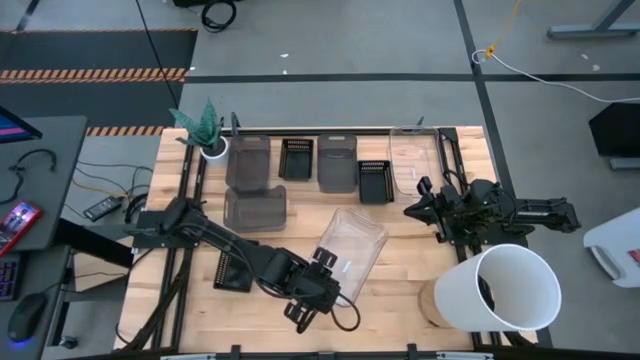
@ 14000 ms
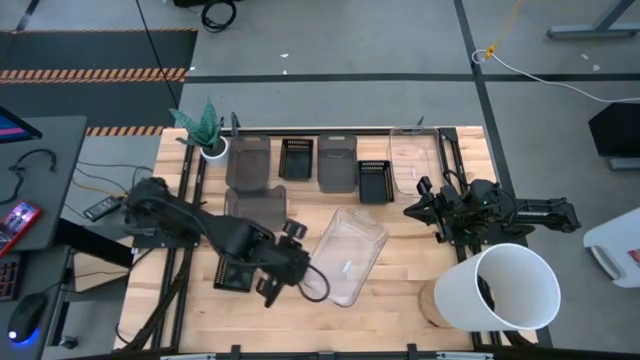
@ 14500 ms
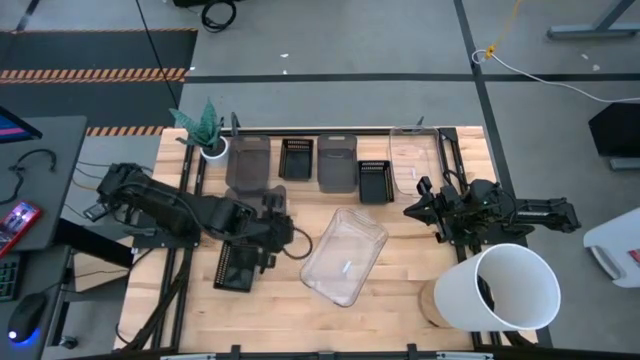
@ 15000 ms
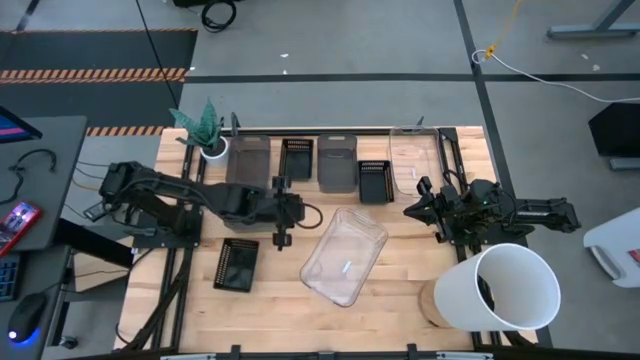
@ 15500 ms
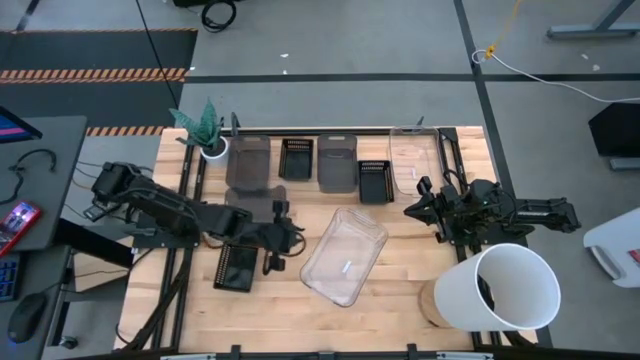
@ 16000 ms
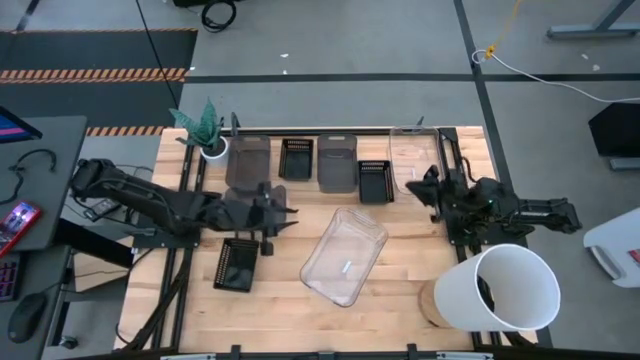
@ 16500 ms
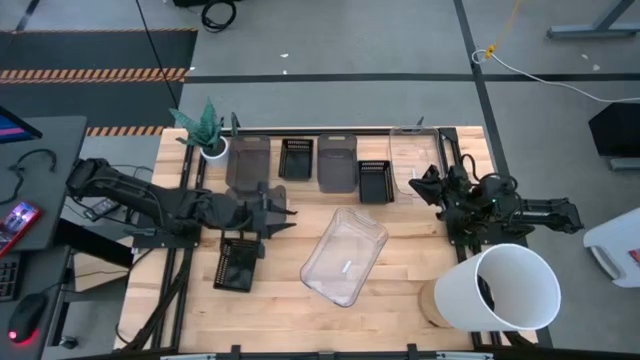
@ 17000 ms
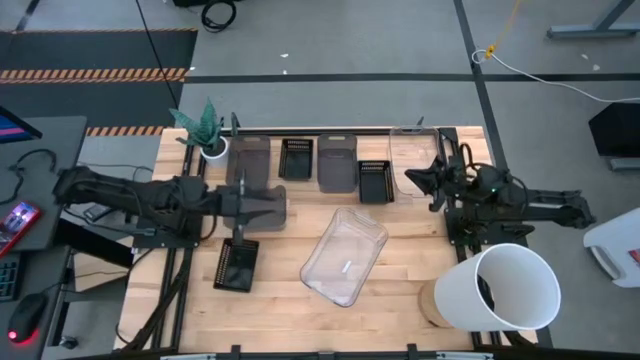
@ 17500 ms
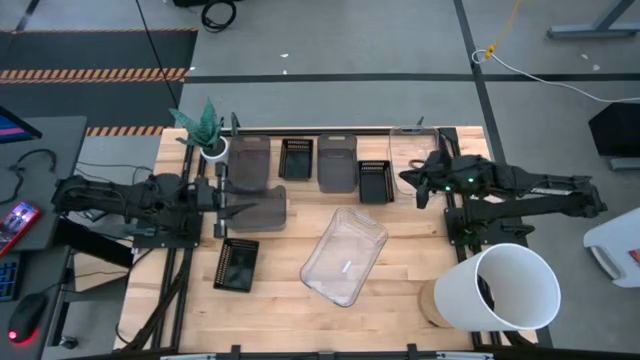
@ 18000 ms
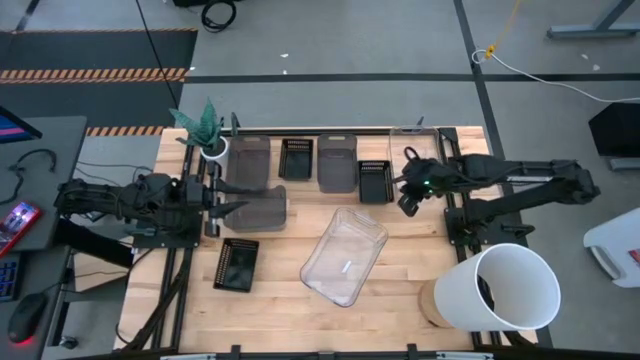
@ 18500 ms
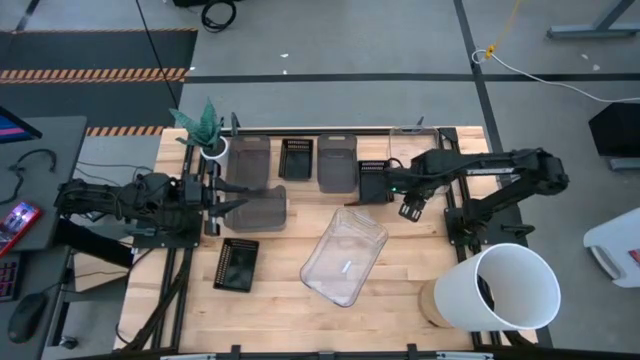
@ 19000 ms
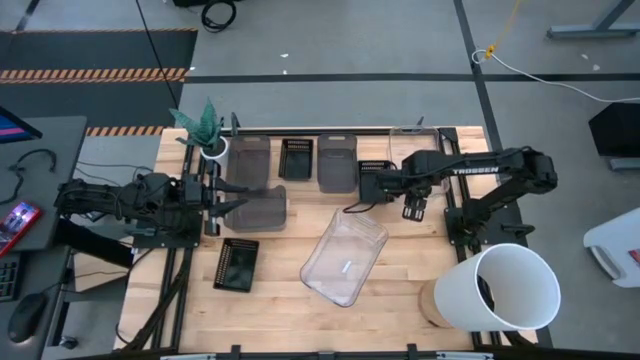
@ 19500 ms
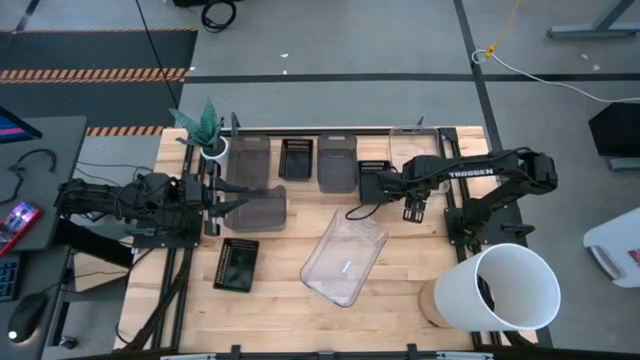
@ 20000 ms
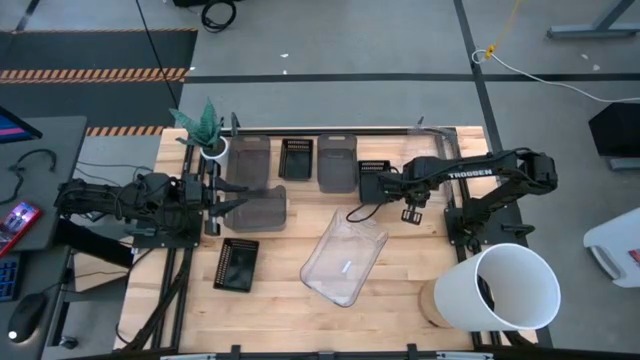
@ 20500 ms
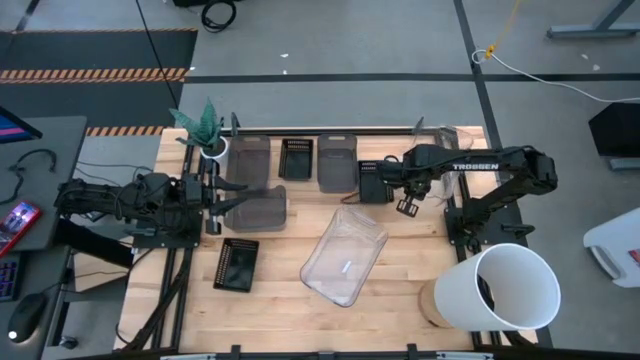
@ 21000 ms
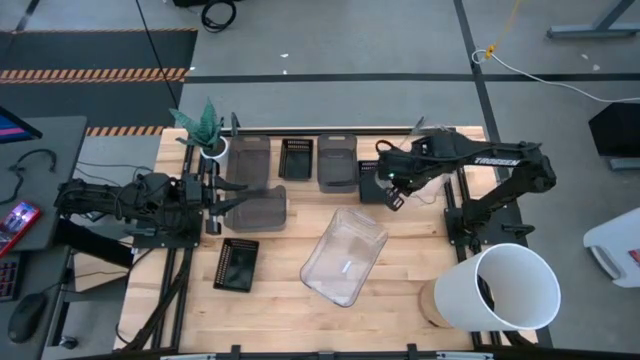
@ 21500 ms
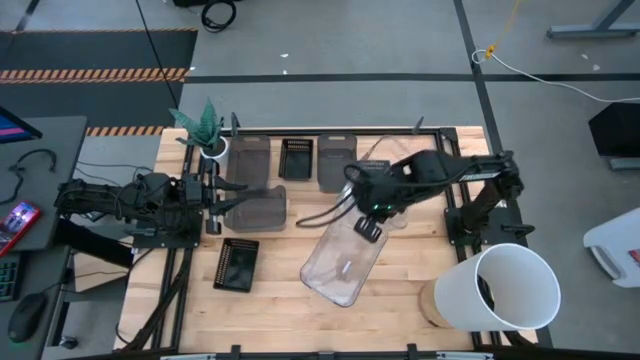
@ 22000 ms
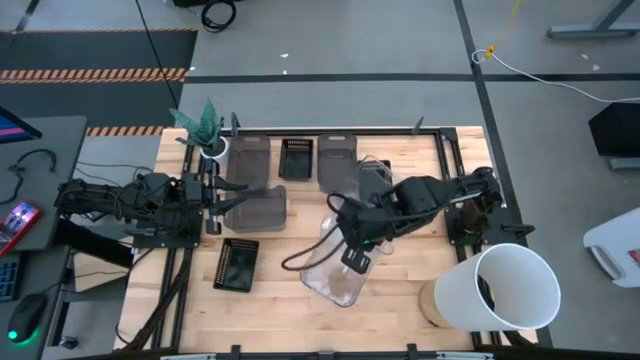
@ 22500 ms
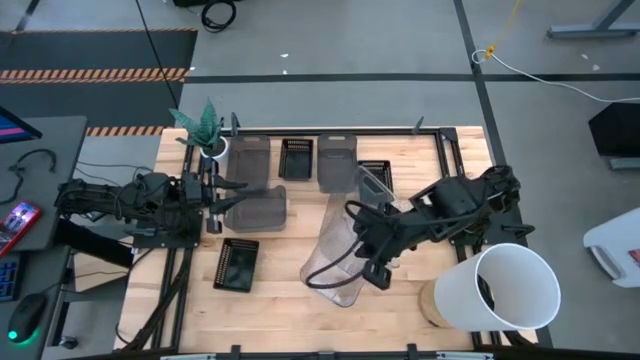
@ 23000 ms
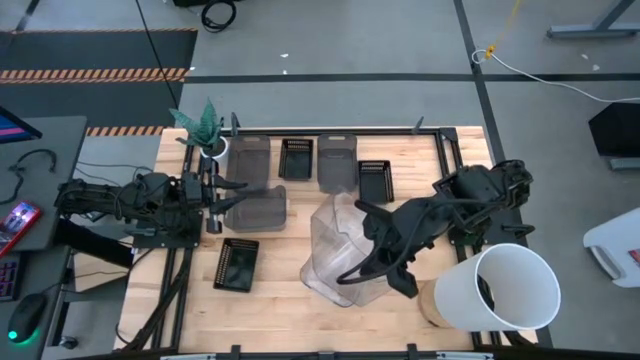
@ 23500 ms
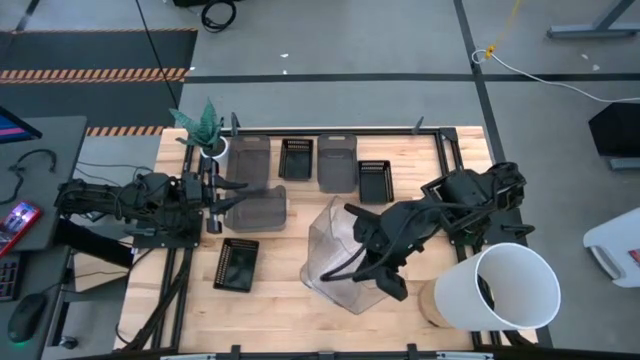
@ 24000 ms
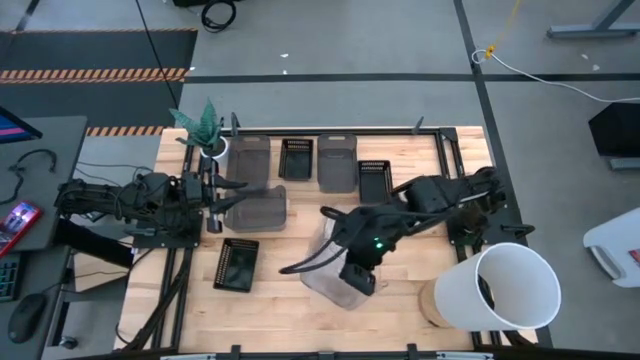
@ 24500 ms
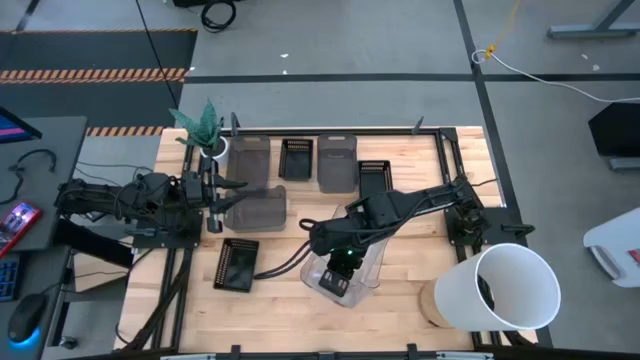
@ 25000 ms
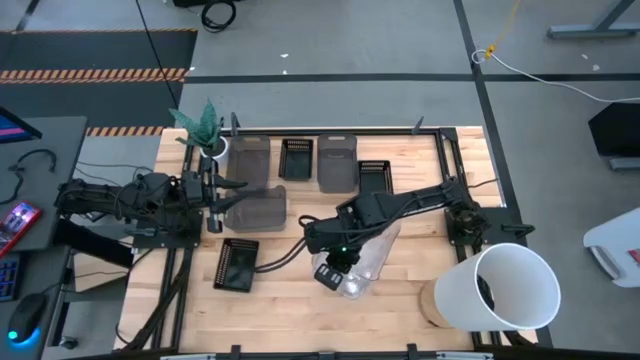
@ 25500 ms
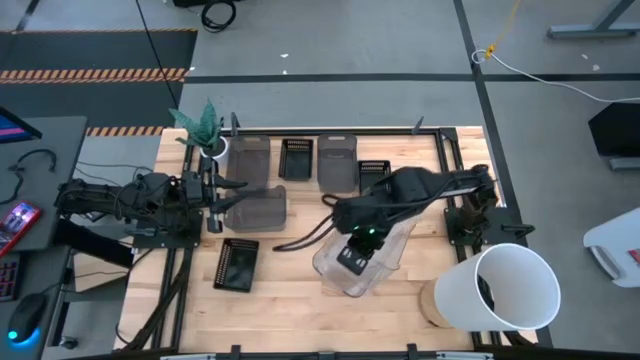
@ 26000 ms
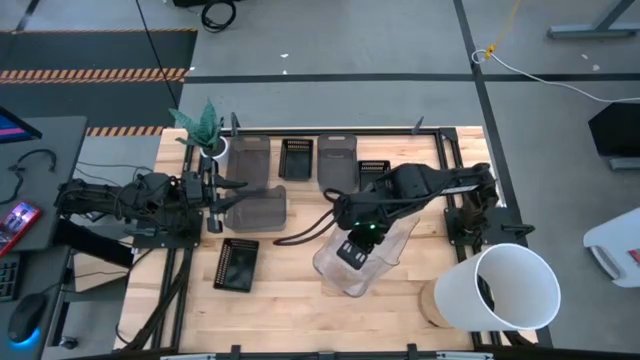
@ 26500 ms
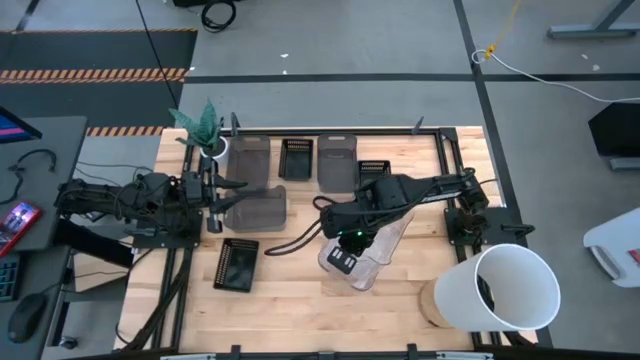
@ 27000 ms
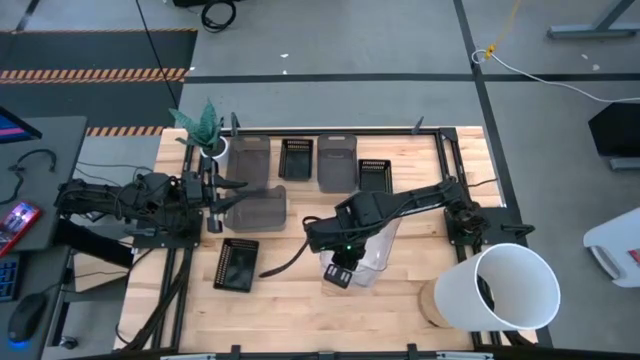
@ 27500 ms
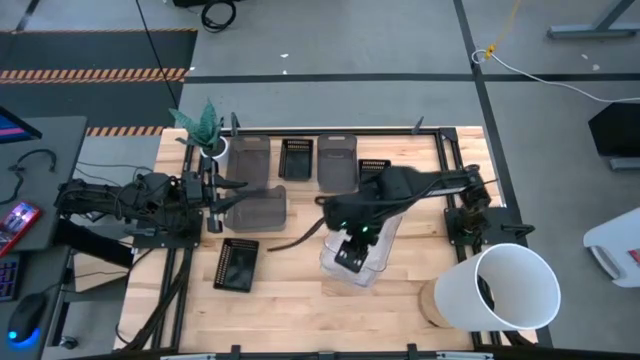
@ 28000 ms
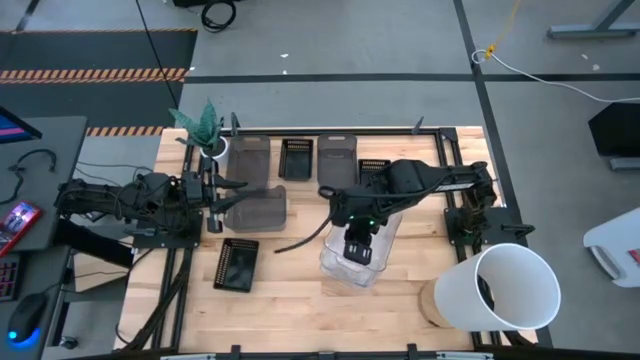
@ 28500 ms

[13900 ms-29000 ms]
Stack the top transparent bin on the bottom stacked transparent bins
